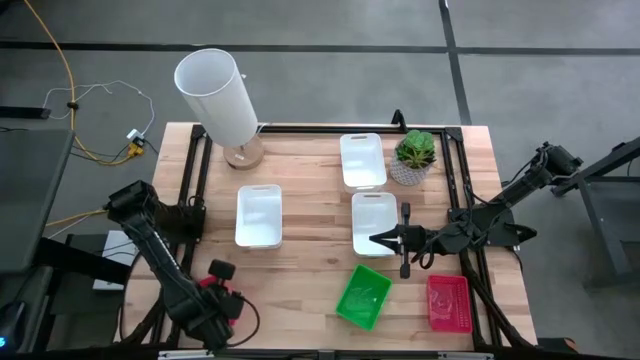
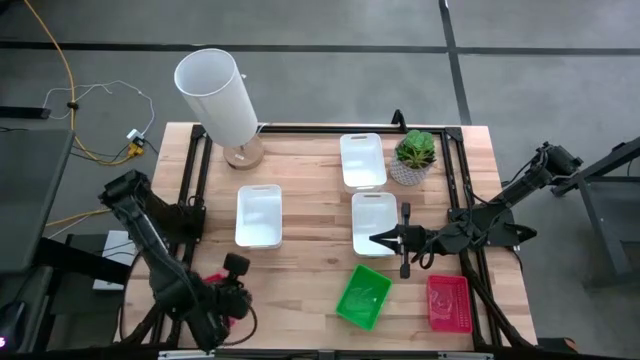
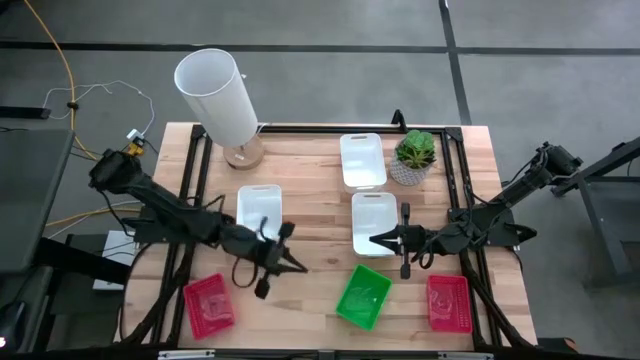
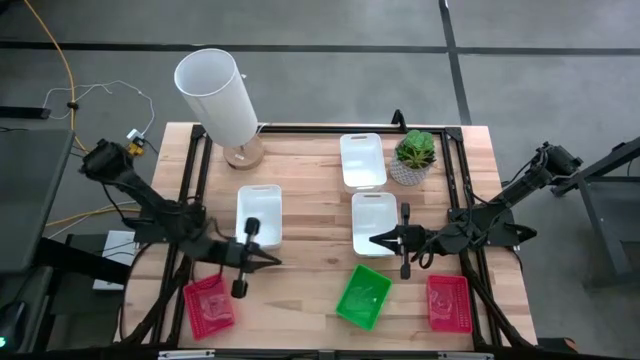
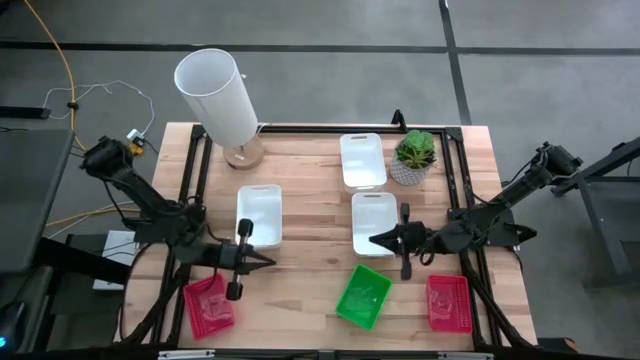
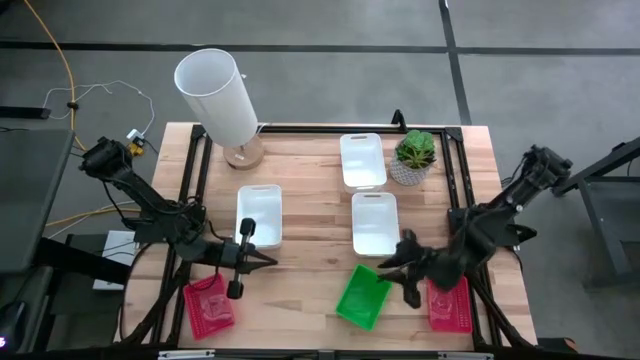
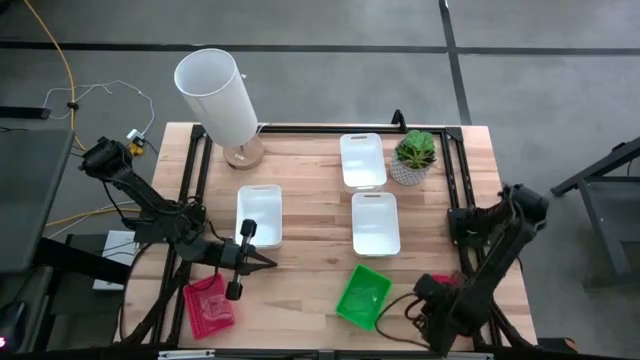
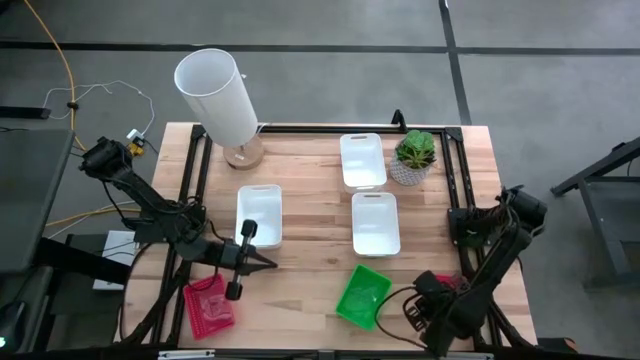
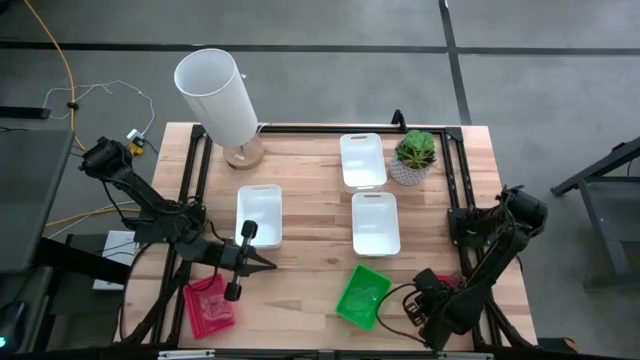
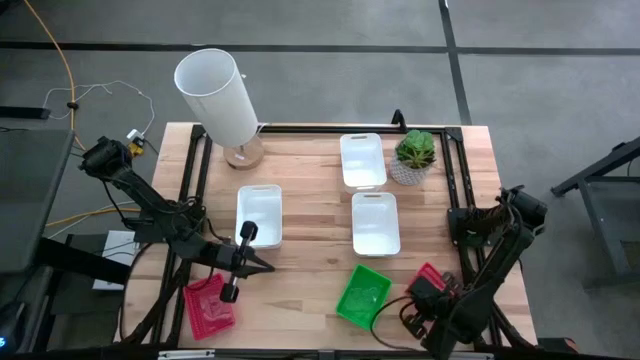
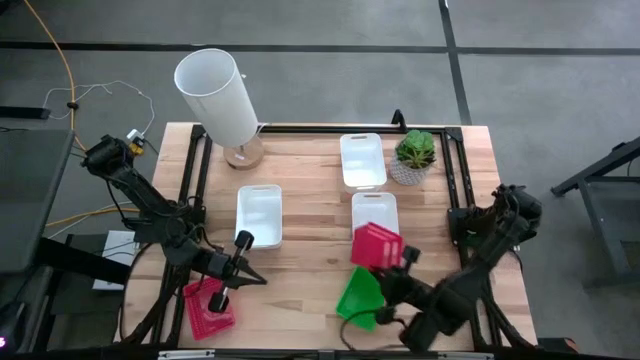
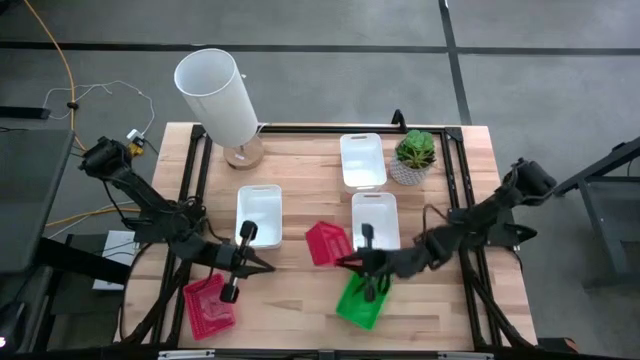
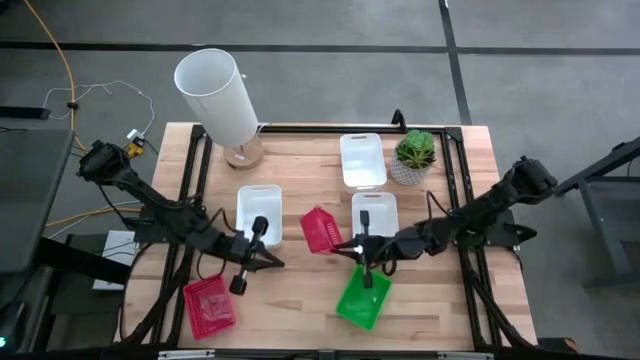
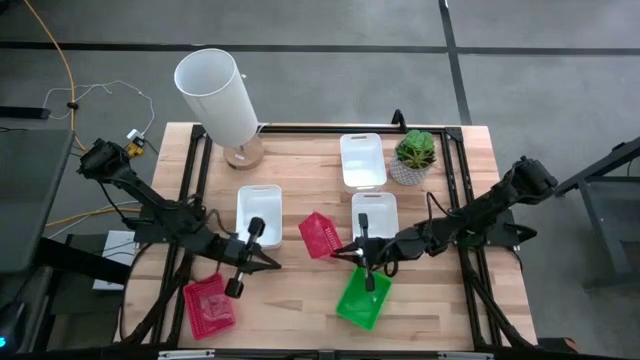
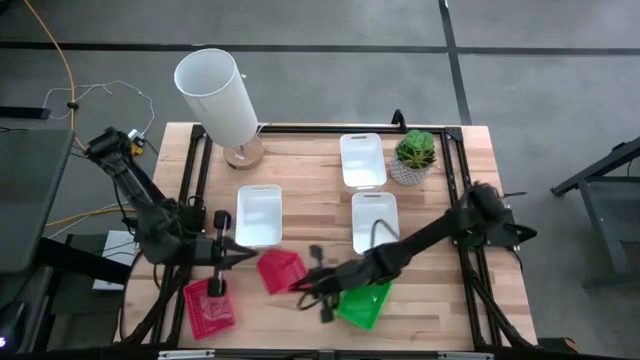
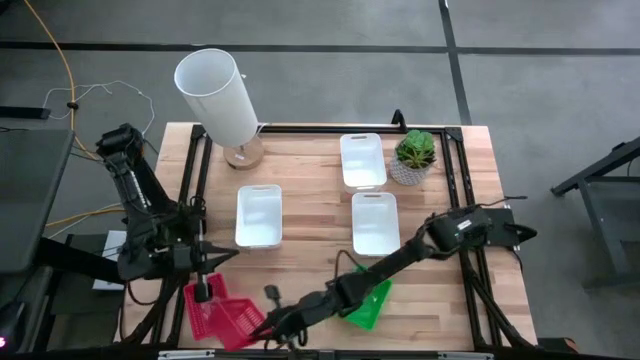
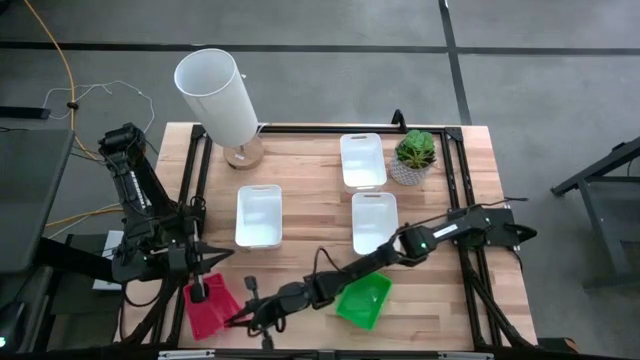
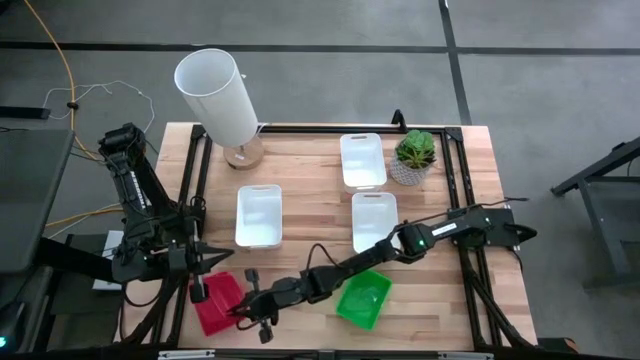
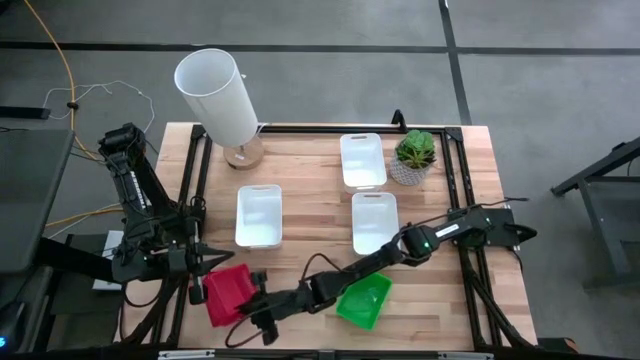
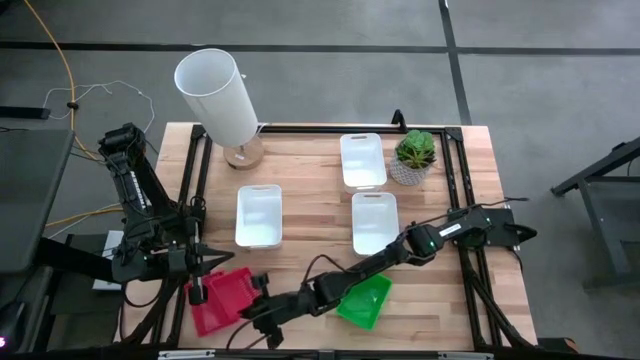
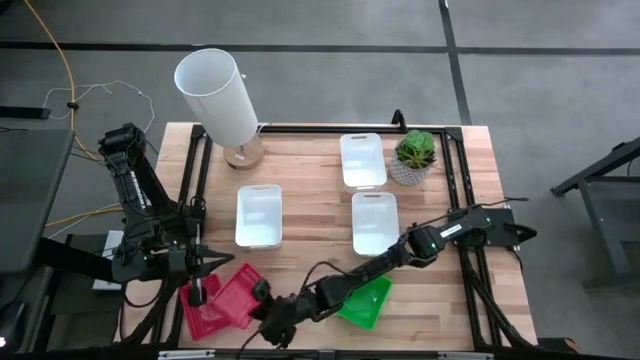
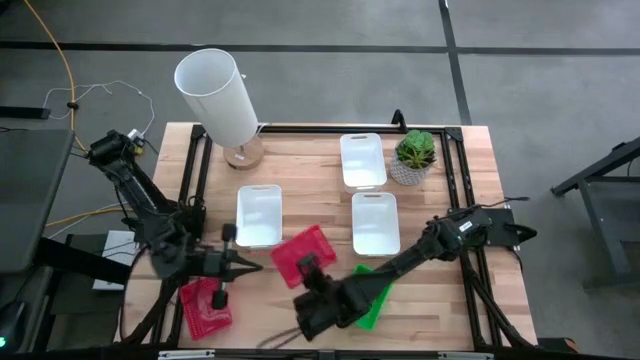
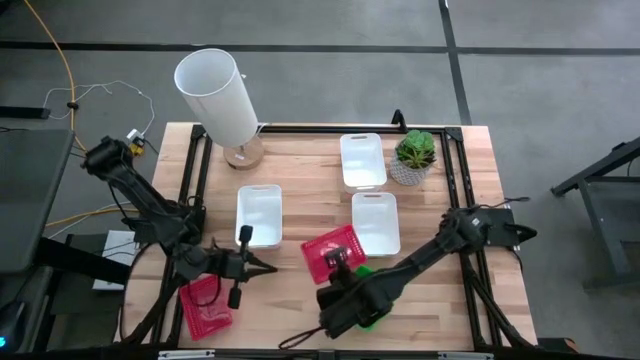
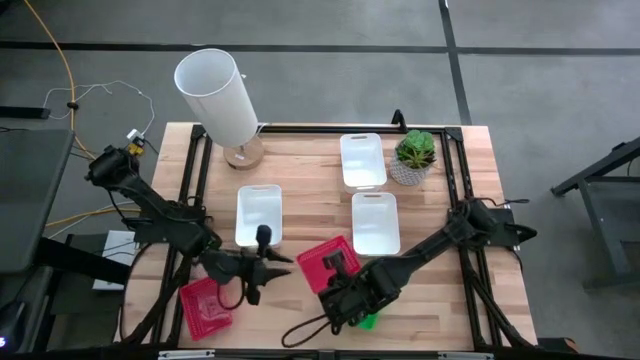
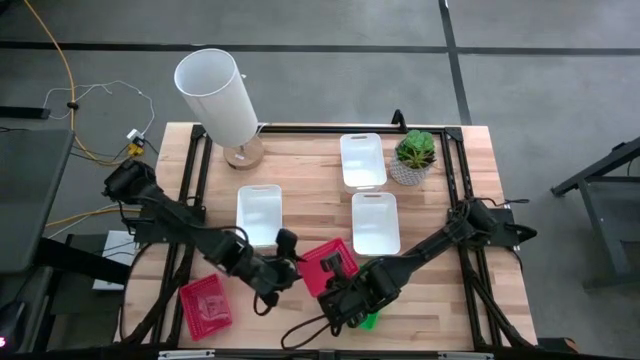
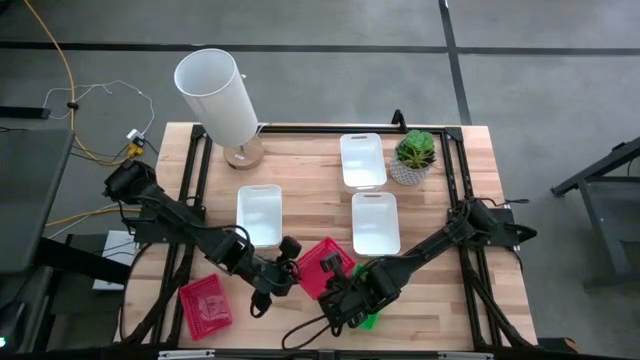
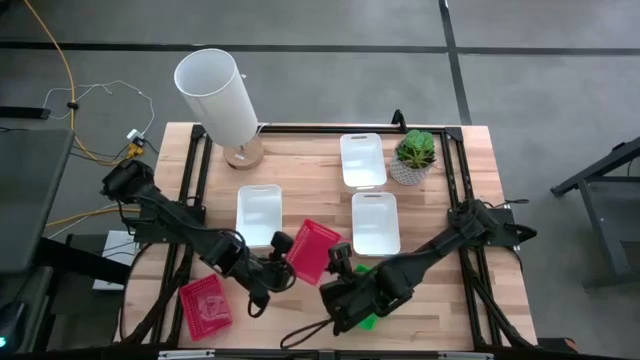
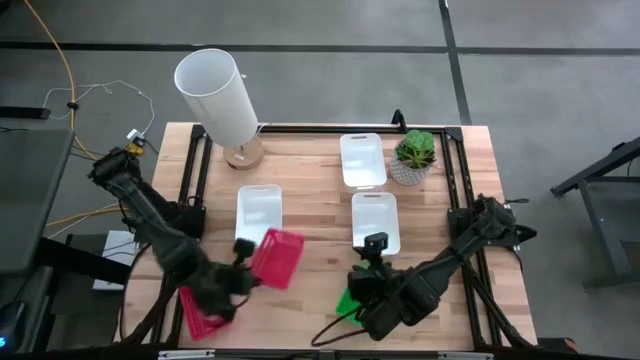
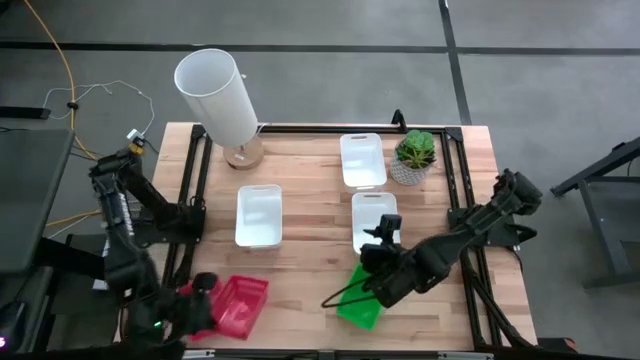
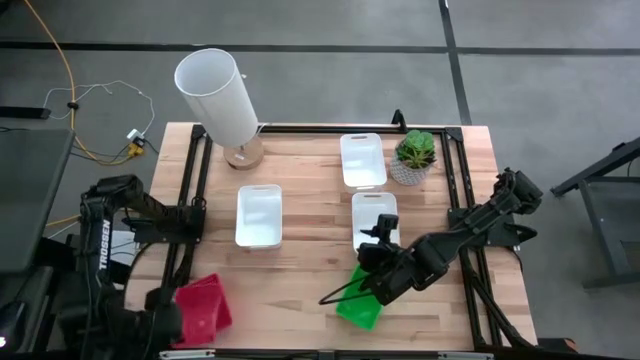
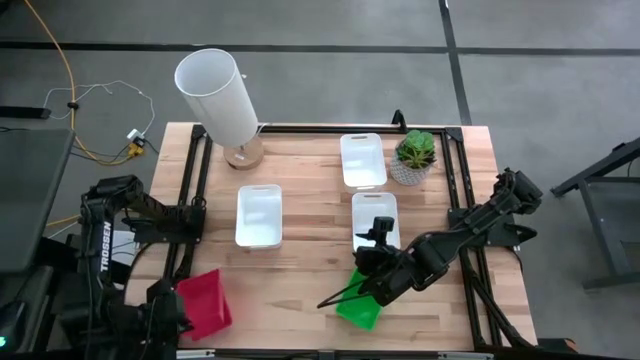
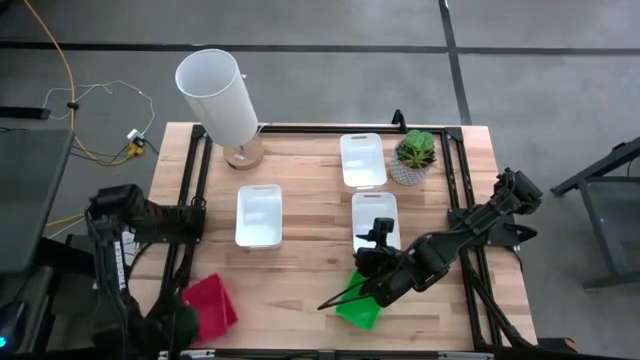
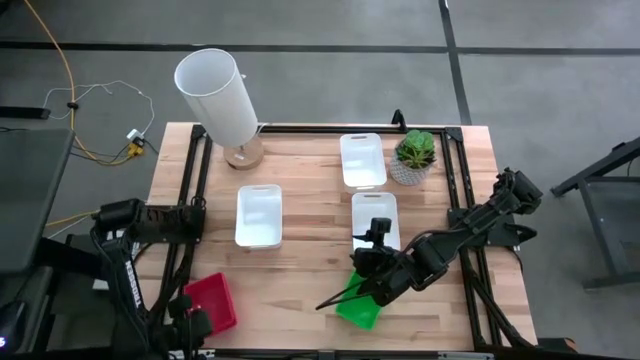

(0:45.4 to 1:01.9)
Stack the right red bin on the left red bin

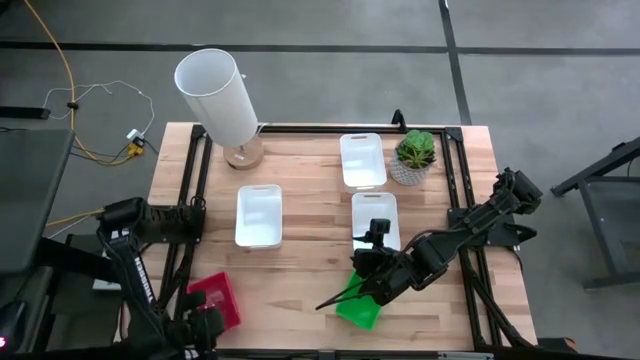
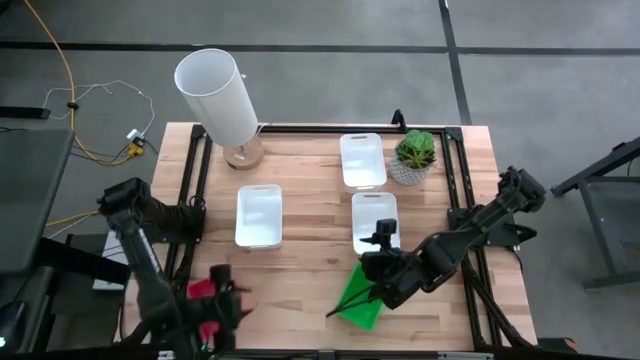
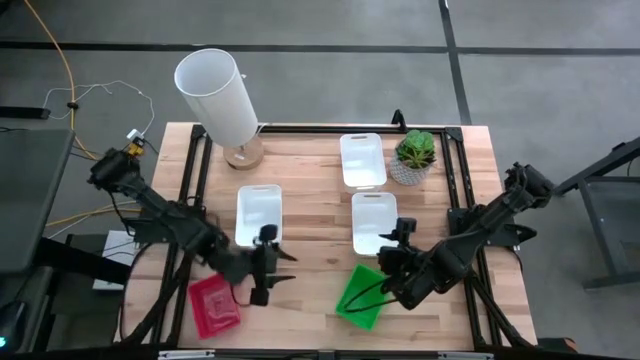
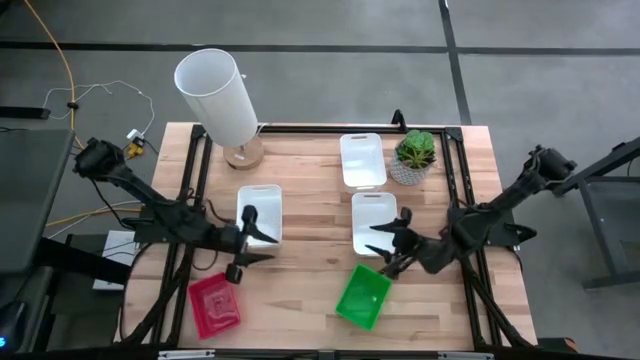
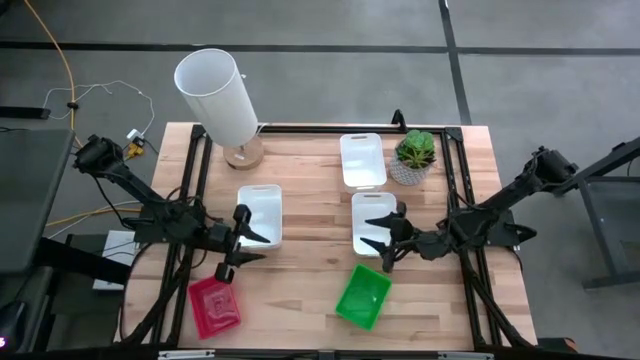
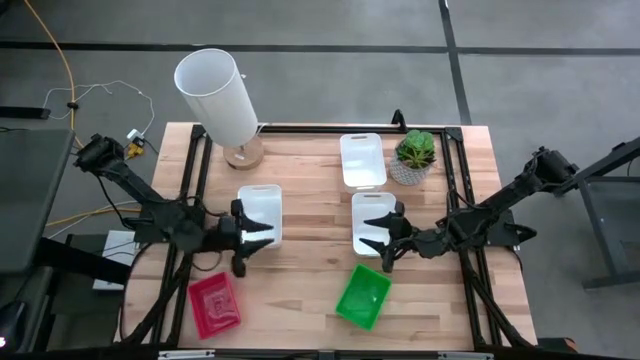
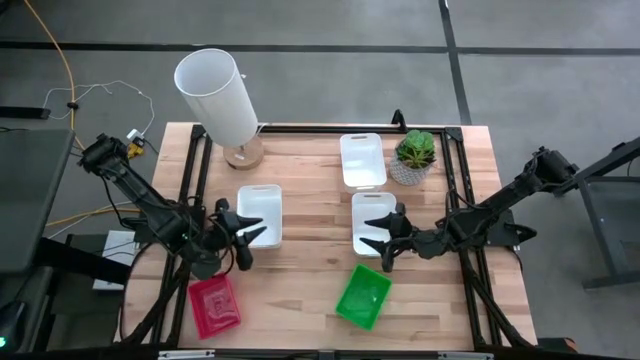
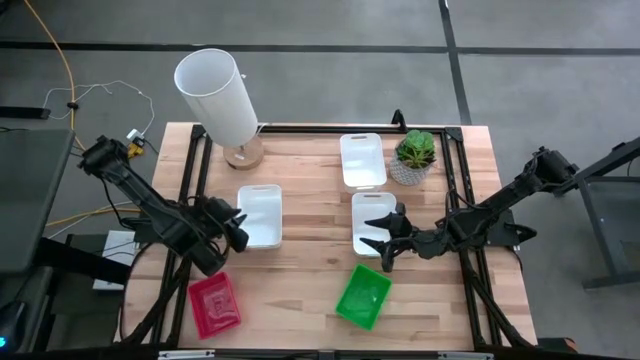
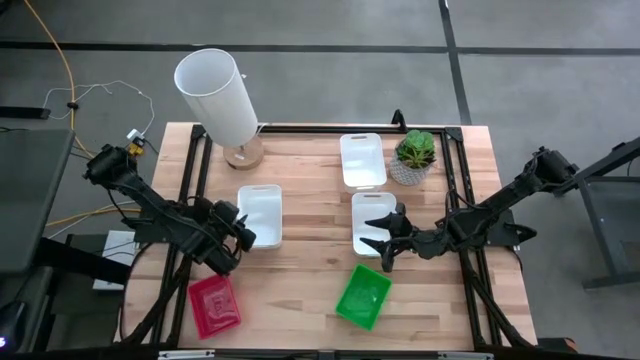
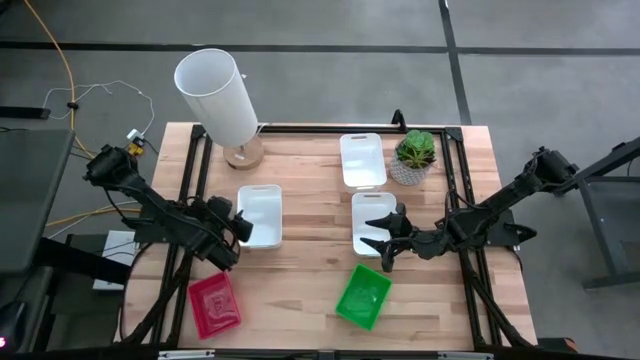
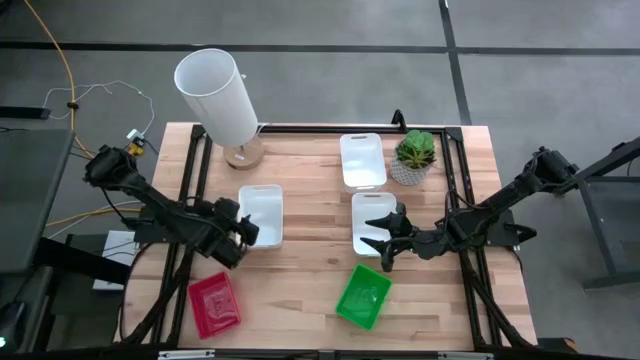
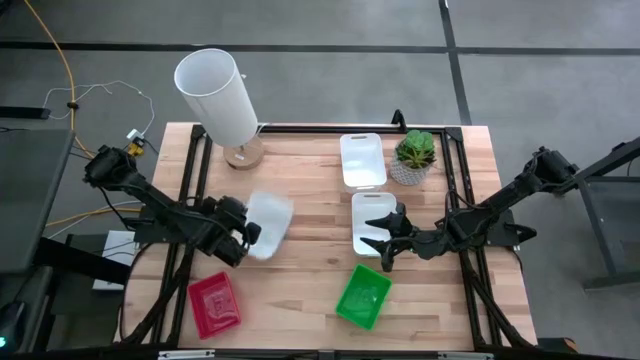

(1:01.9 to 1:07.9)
Stack the bottom left white bin on the bottom right white bin
